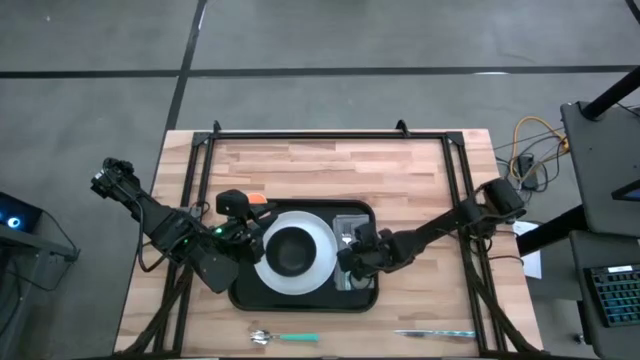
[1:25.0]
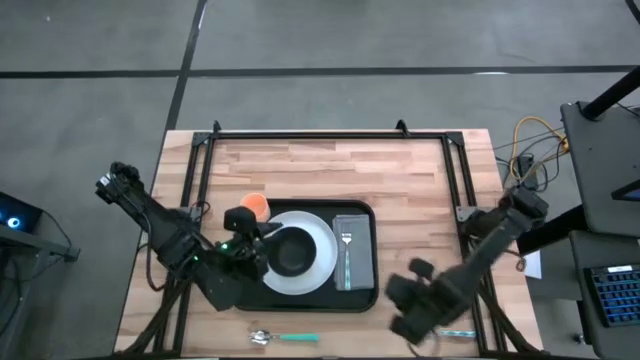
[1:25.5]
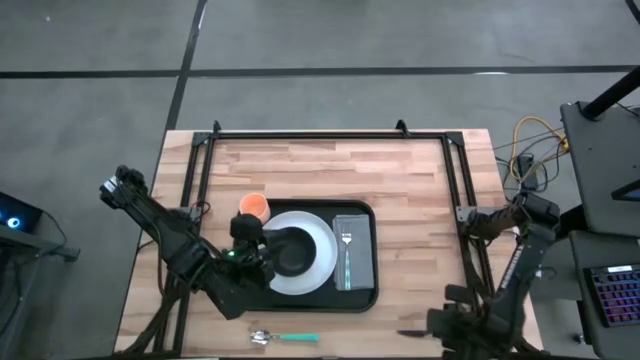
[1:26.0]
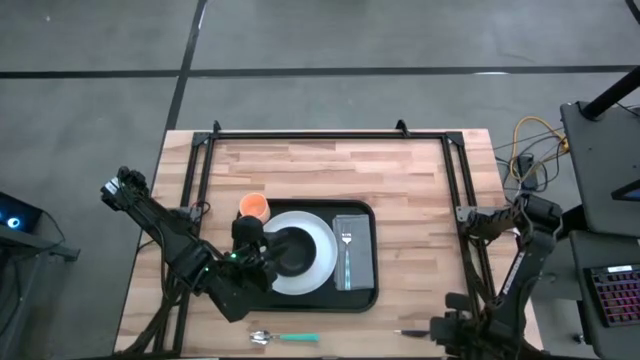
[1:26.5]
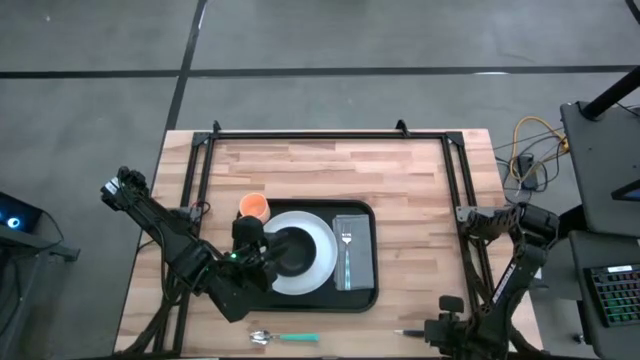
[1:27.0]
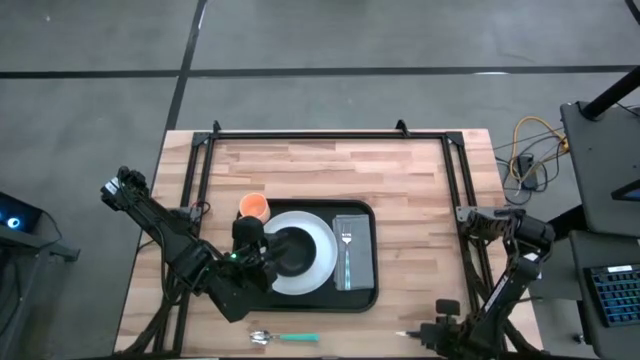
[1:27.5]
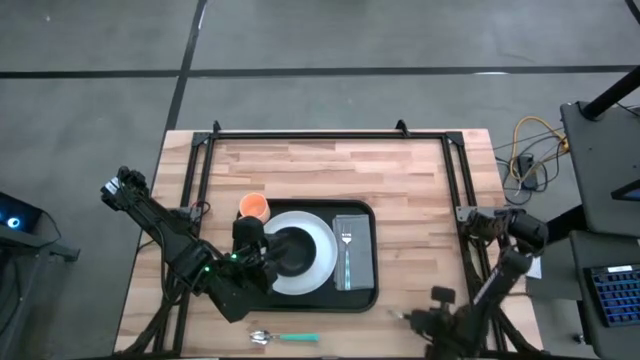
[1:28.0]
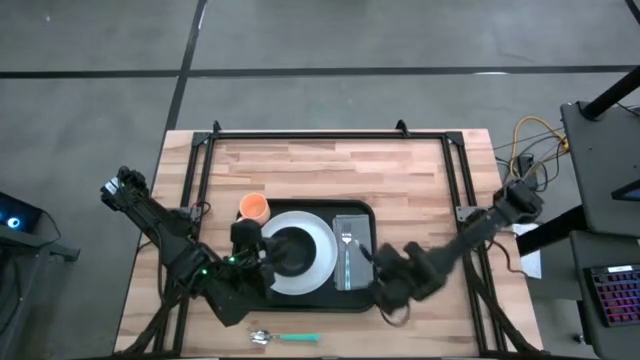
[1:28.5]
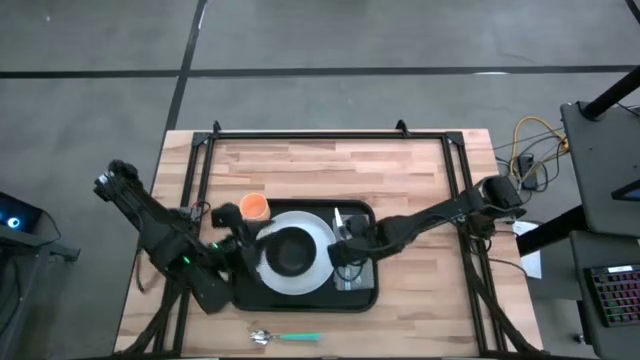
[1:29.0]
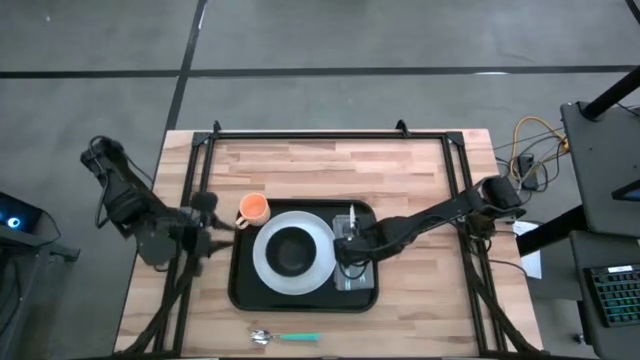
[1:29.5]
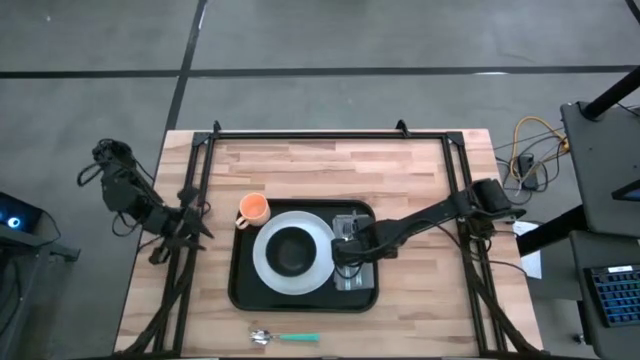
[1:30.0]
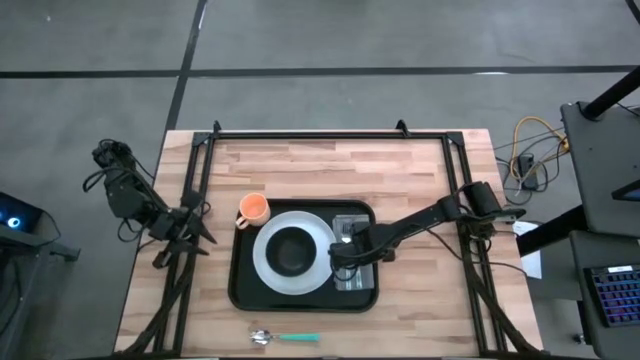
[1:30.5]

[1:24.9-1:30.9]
Task: Set up tray
Put the green table knife to the right of the green fork on the gray table napkin on the black serving tray

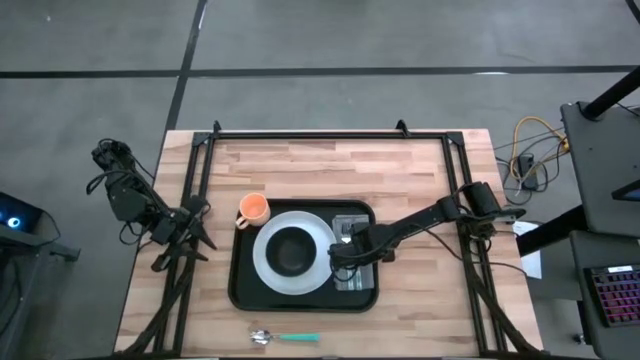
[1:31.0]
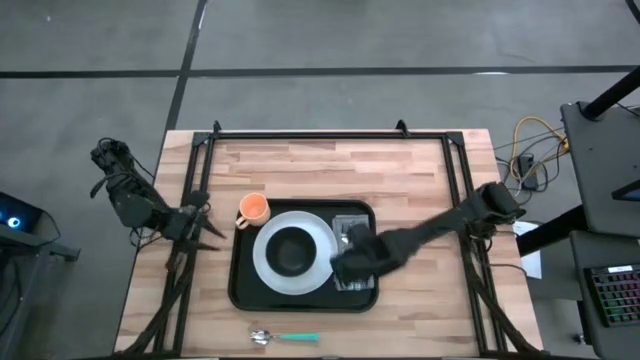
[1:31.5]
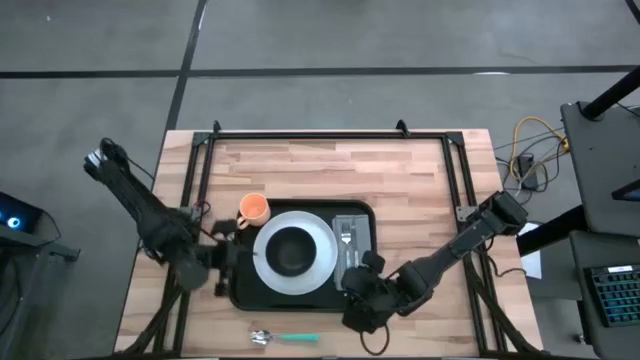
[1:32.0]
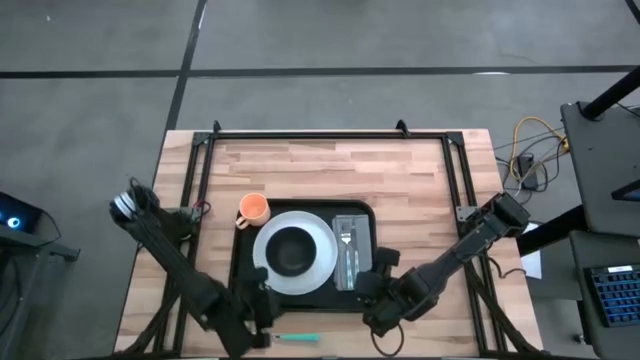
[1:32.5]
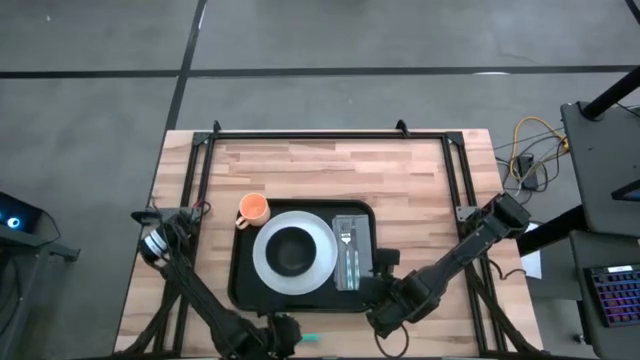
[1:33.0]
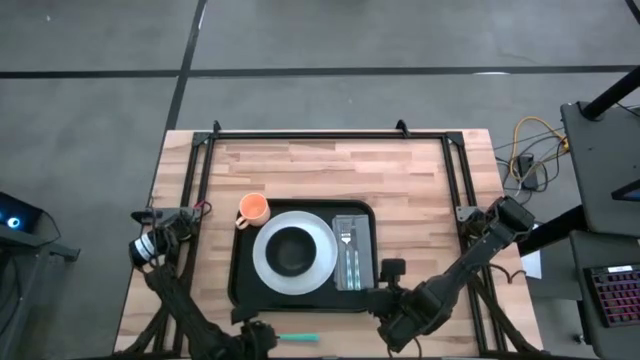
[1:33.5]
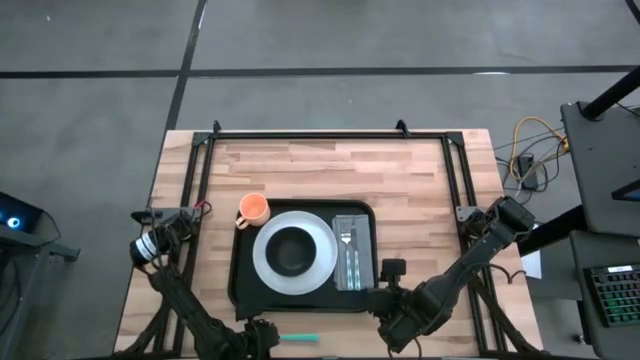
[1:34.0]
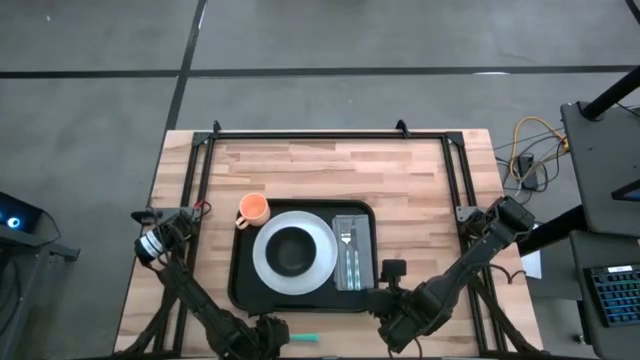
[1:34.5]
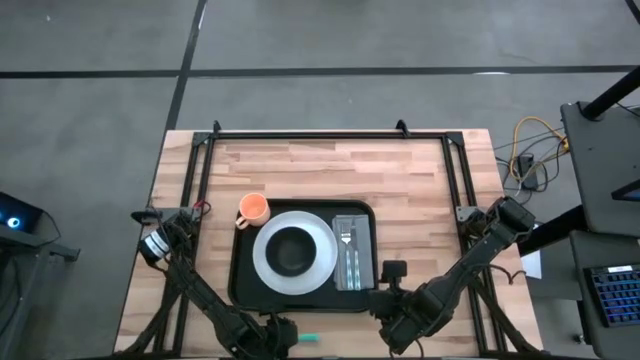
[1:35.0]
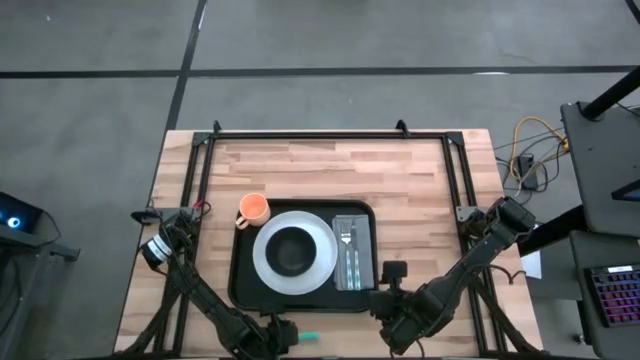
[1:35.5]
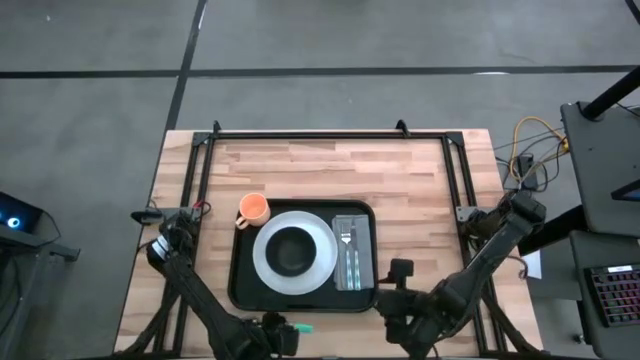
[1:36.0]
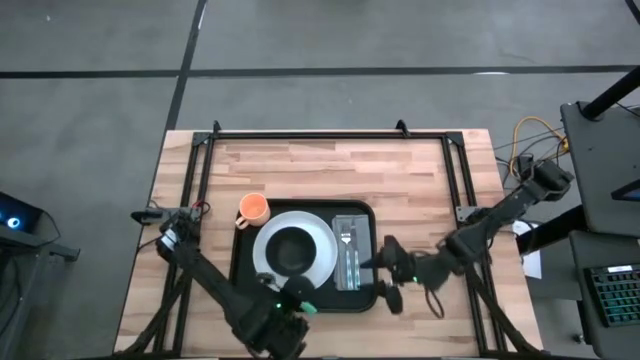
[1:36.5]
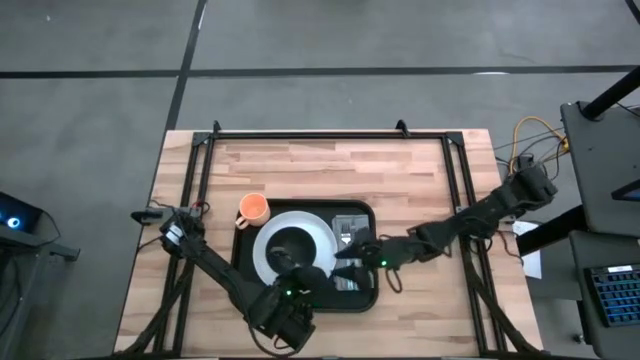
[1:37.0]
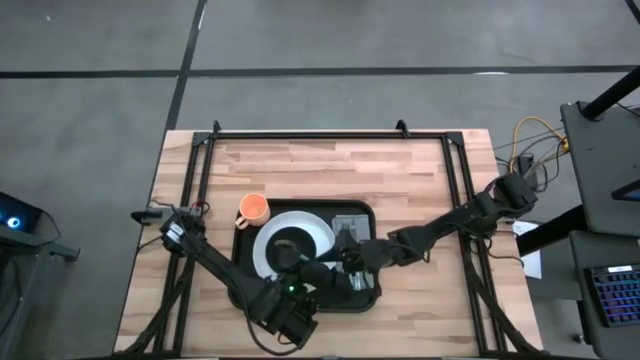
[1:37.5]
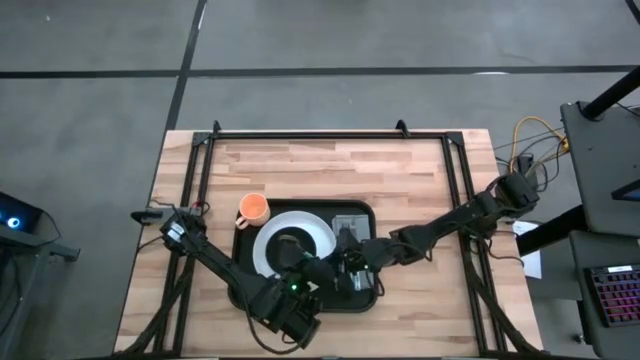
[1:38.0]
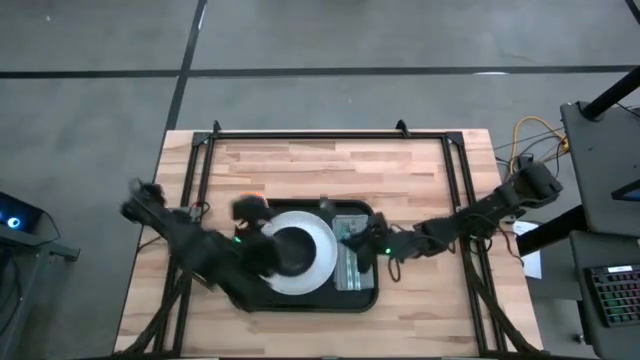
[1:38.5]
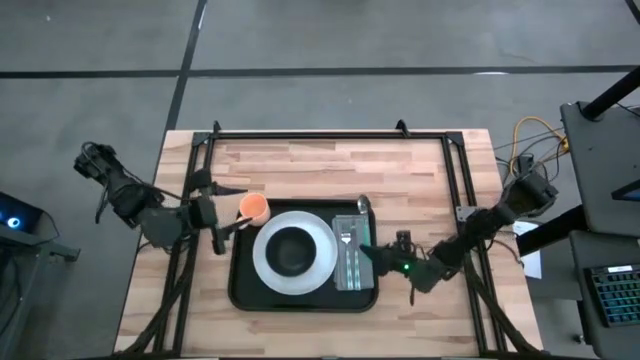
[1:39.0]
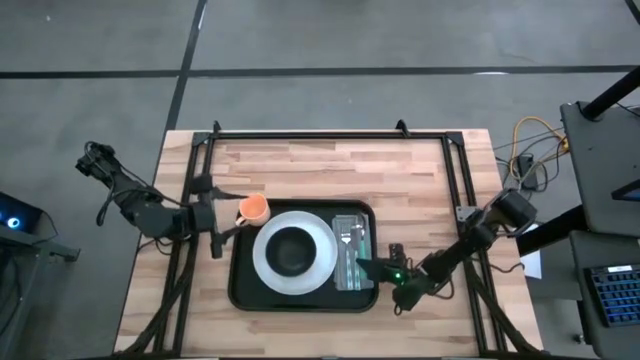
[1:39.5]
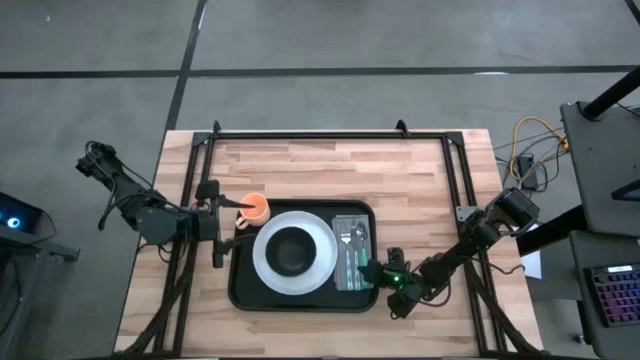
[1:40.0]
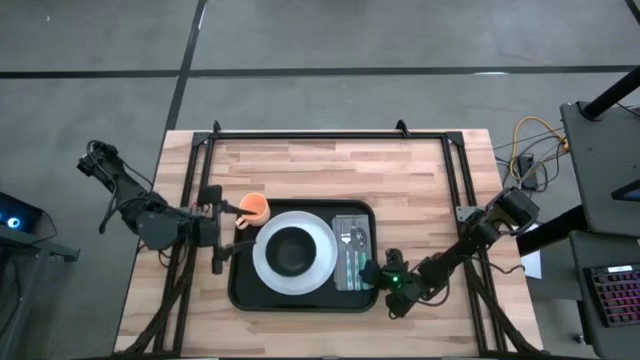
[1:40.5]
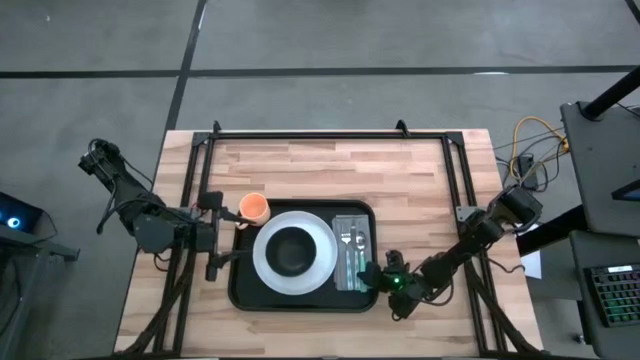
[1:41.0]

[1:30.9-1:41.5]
Put the green spoon to the right of the green table knife on the gray table napkin on the black serving tray

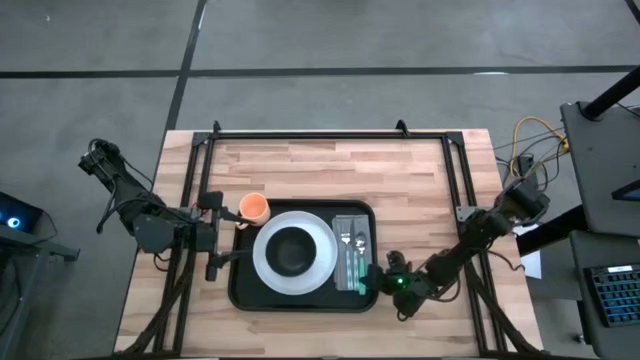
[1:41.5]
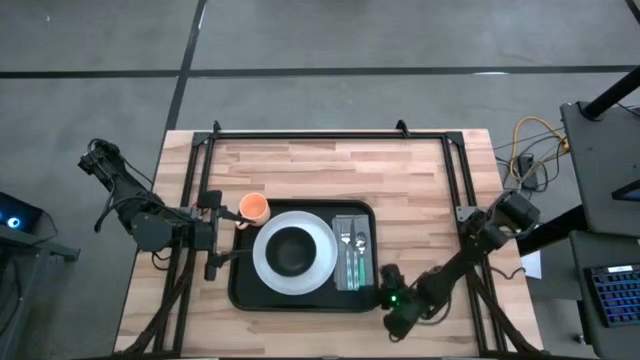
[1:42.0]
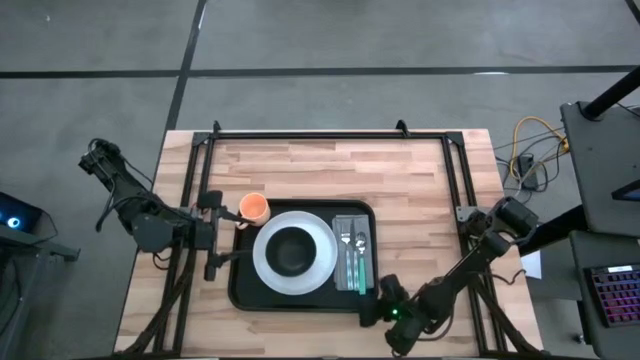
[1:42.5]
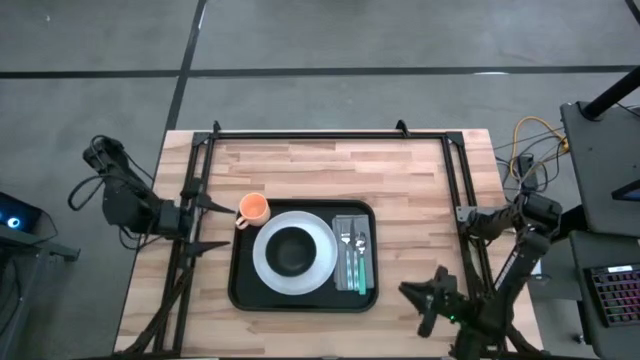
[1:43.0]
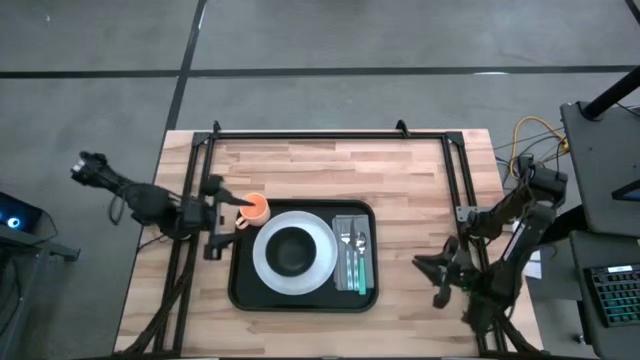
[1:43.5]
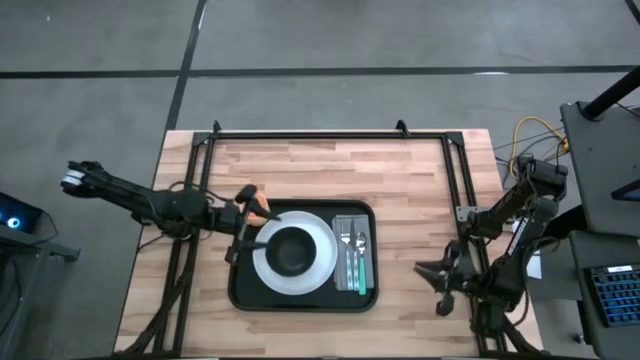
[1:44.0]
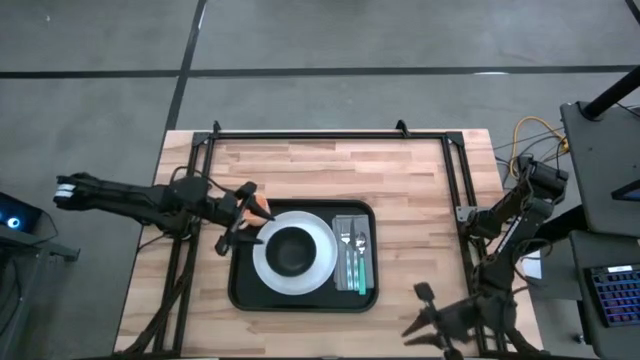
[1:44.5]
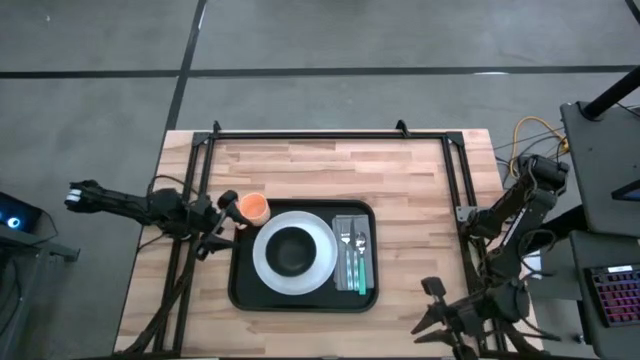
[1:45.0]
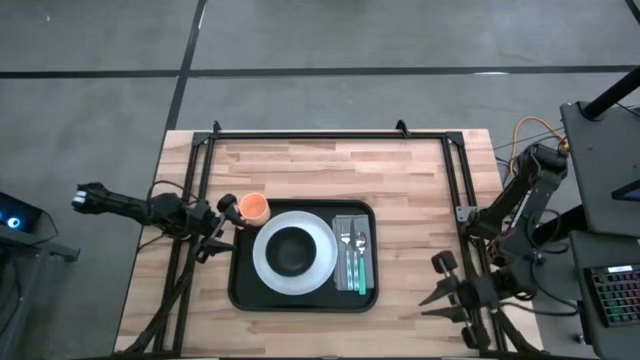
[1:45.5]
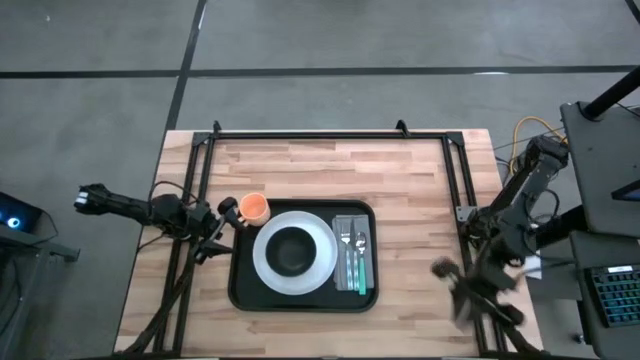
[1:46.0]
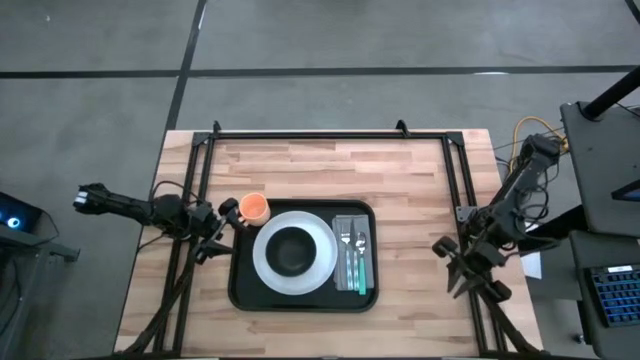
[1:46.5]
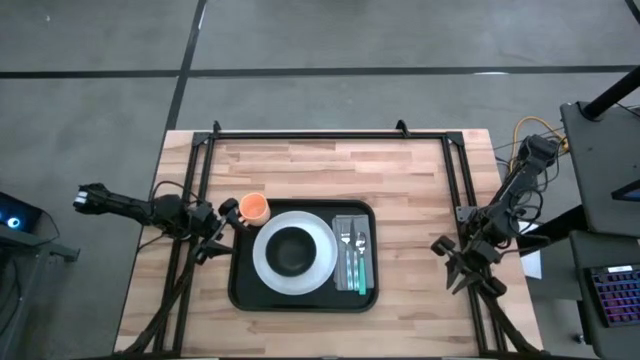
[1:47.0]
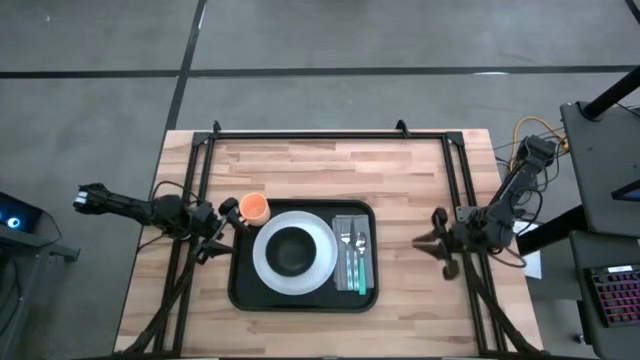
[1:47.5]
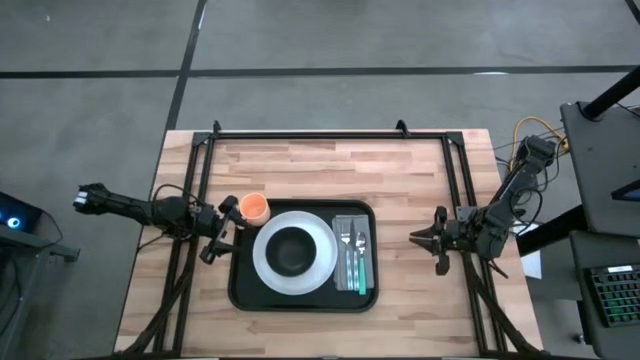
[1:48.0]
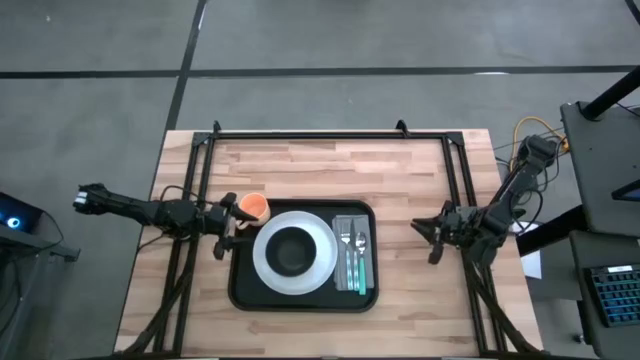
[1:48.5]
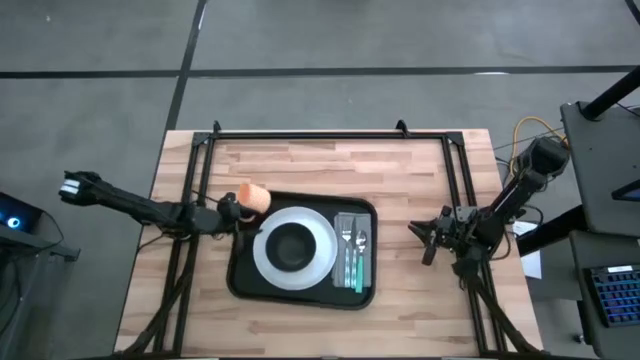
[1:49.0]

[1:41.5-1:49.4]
Adjust the light orange mug on the black serving tray
